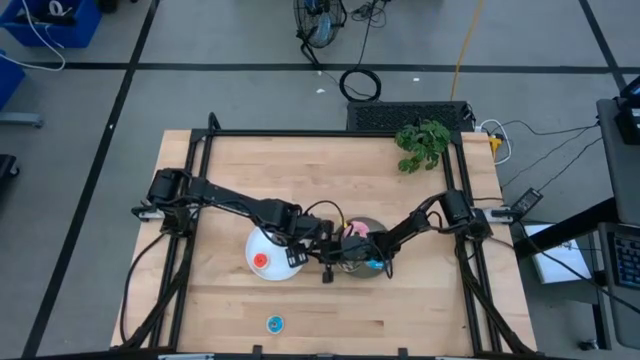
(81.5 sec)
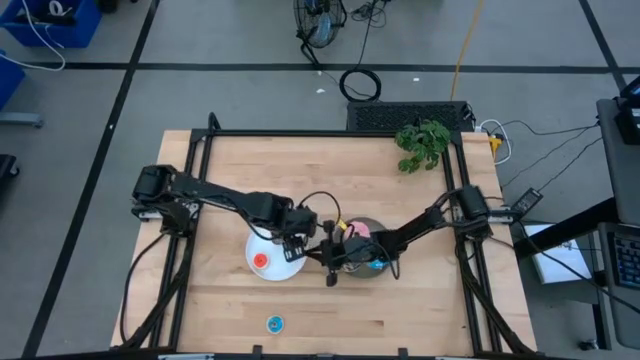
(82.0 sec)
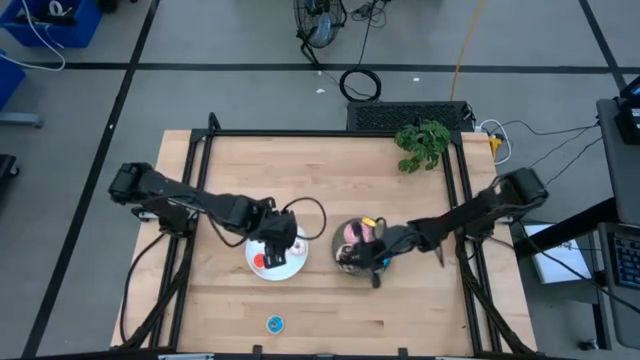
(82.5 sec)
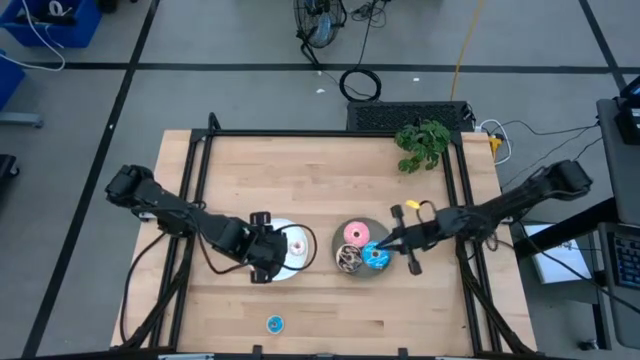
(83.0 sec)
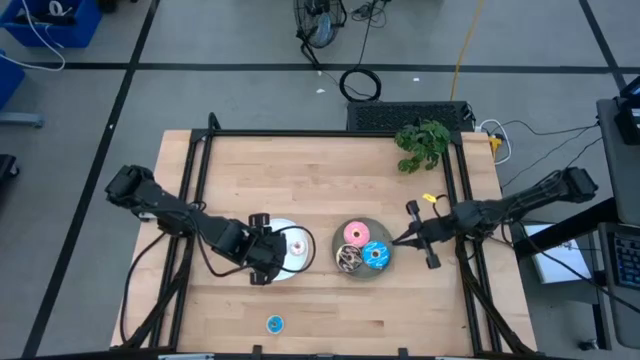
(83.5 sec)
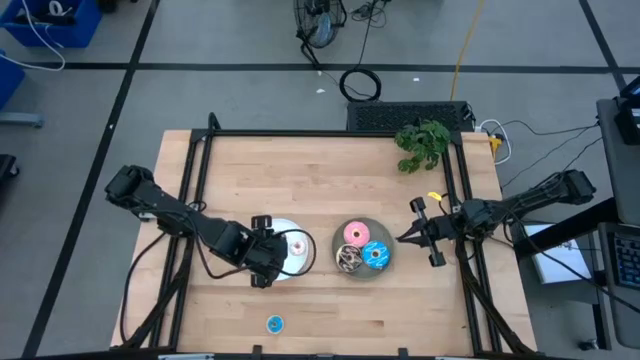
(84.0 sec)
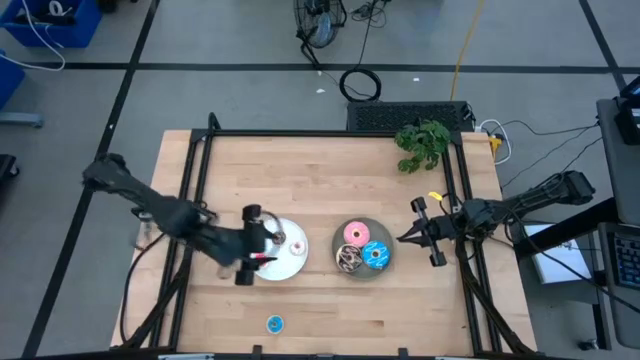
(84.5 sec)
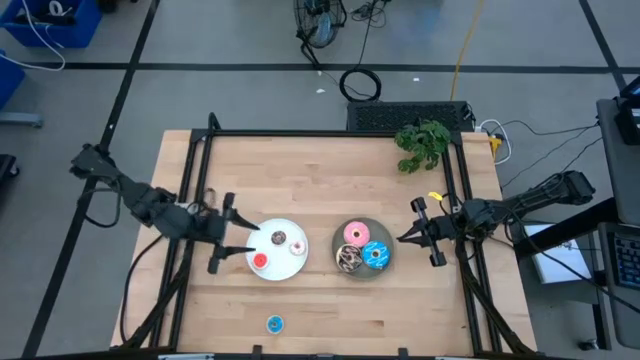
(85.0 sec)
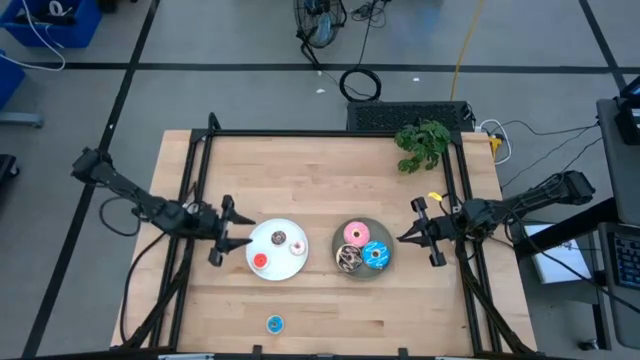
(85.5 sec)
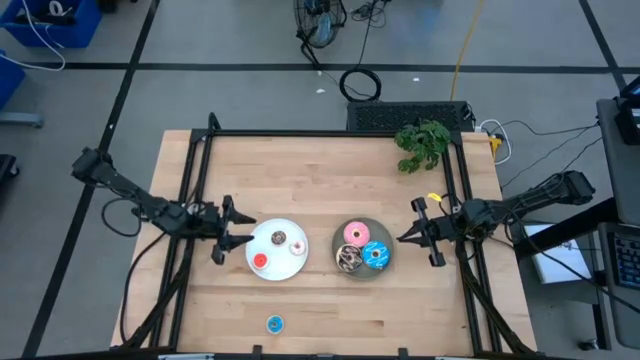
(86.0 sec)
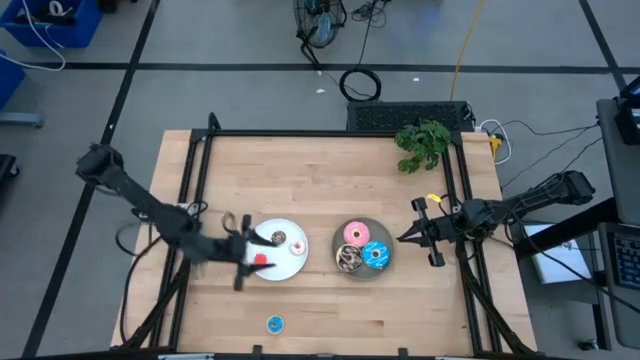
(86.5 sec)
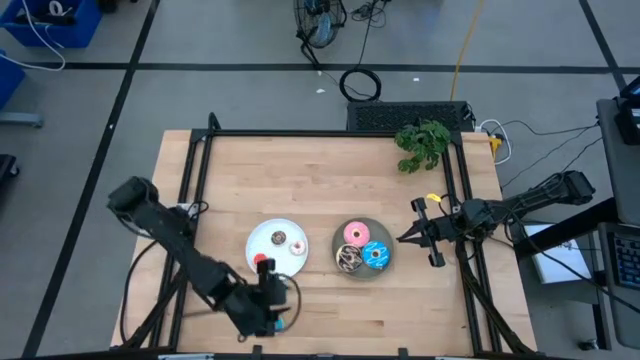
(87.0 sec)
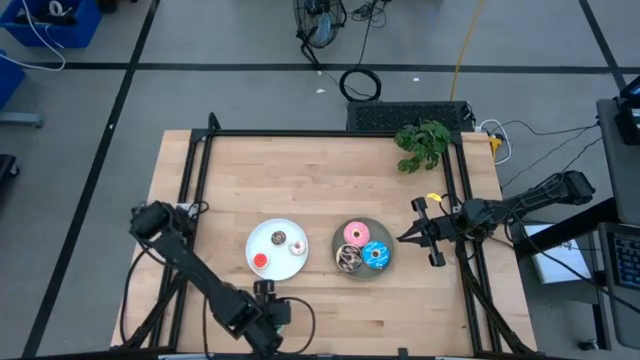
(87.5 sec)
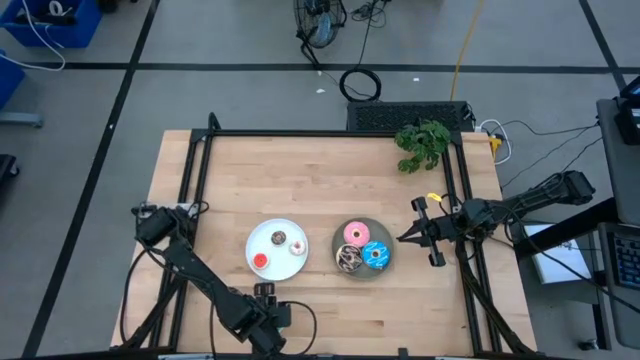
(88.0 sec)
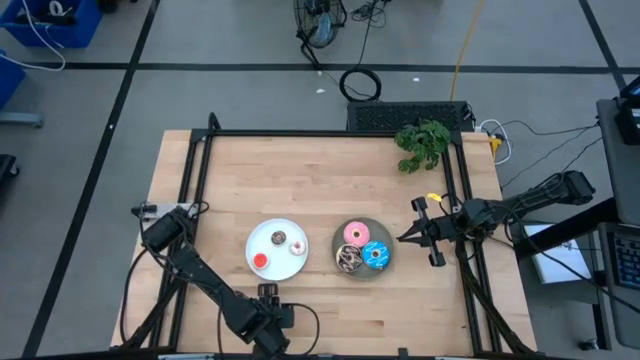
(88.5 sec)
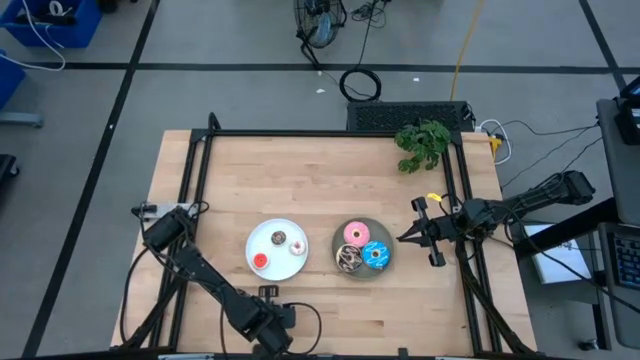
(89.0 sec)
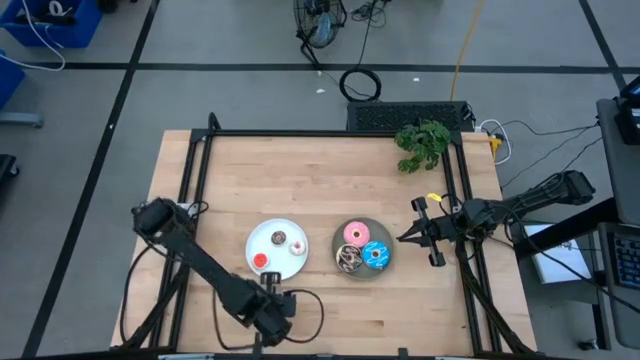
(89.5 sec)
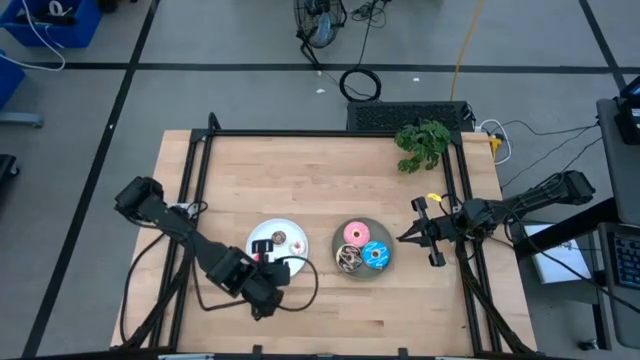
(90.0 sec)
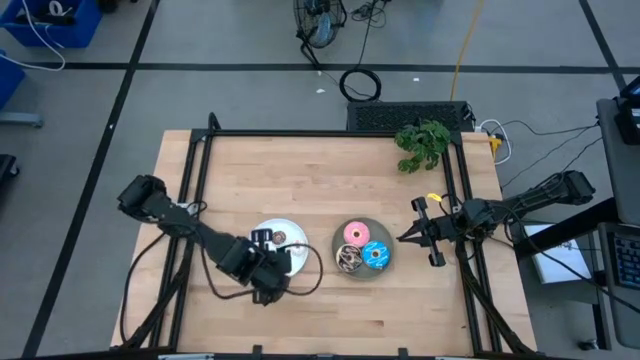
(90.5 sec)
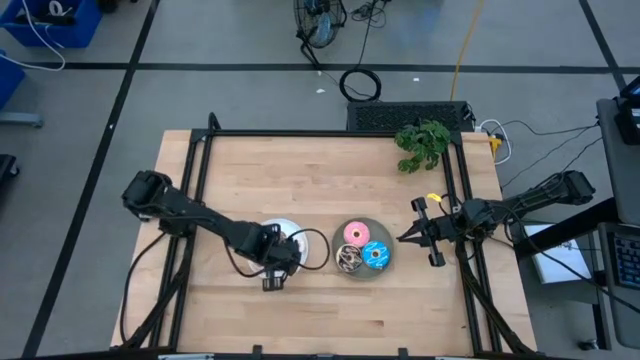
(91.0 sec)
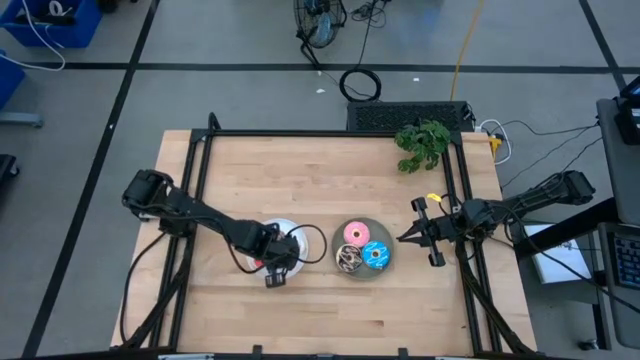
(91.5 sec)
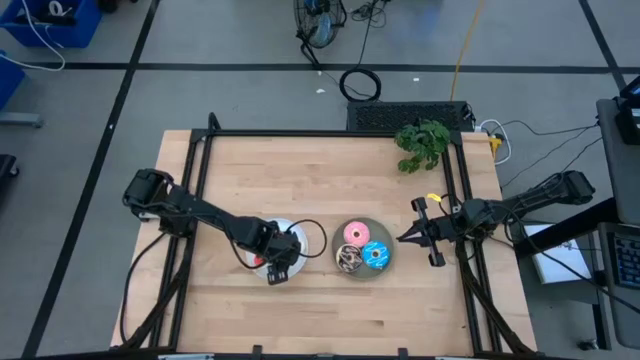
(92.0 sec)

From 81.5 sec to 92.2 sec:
Task: Pick & Place donuts
Put the small blue donut on the white plate

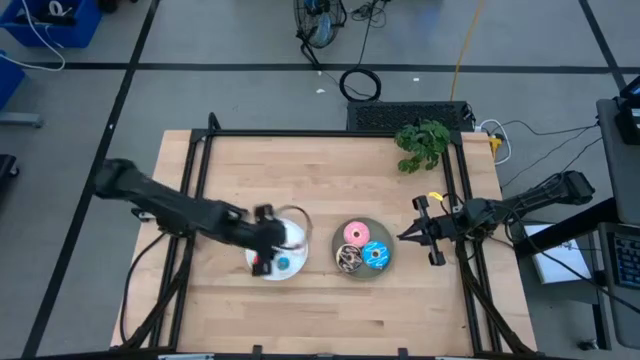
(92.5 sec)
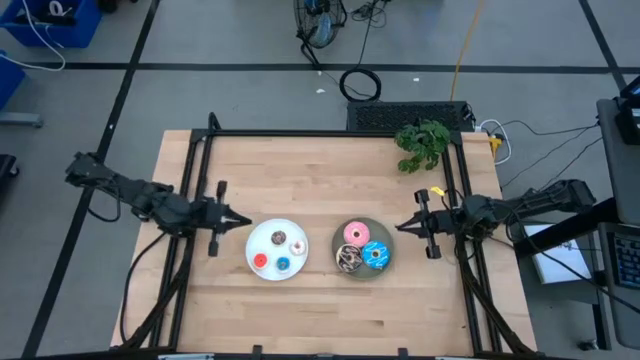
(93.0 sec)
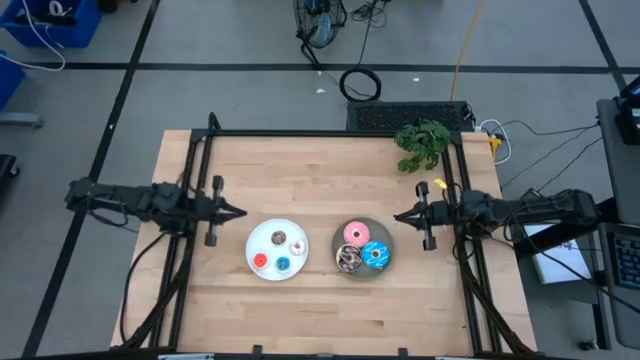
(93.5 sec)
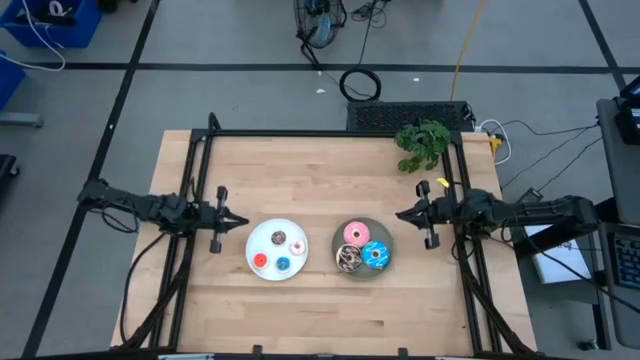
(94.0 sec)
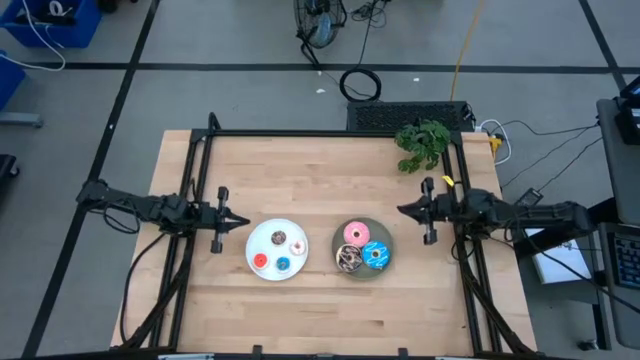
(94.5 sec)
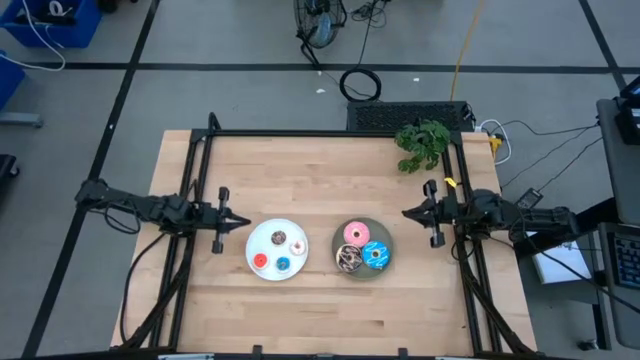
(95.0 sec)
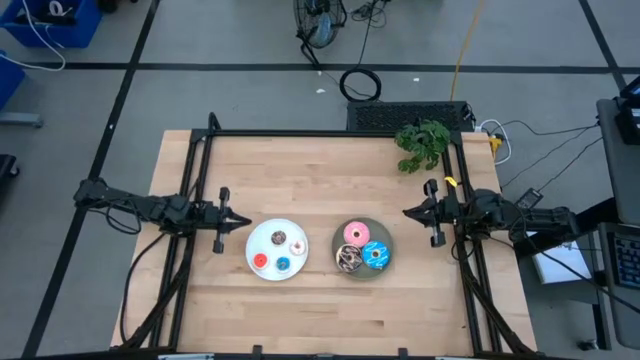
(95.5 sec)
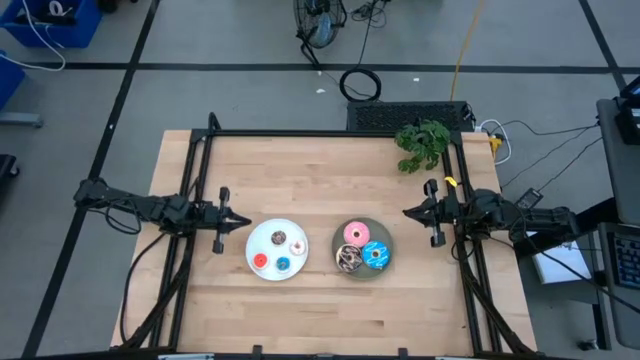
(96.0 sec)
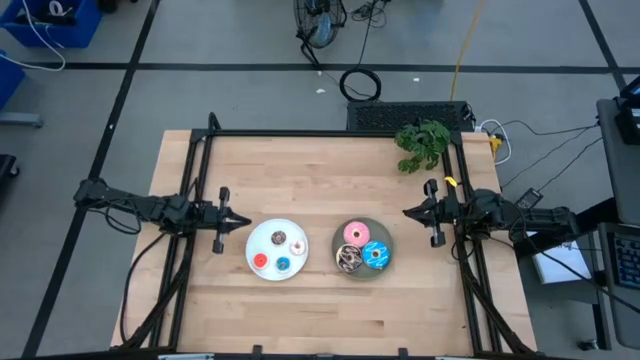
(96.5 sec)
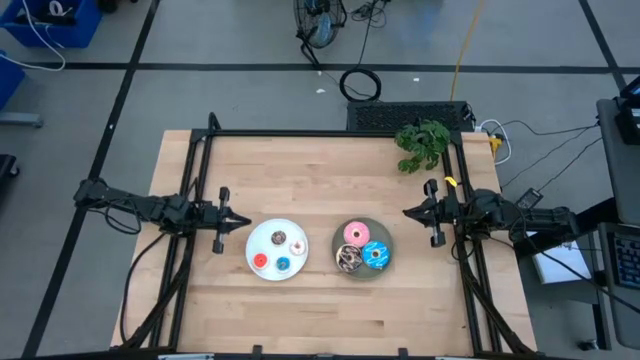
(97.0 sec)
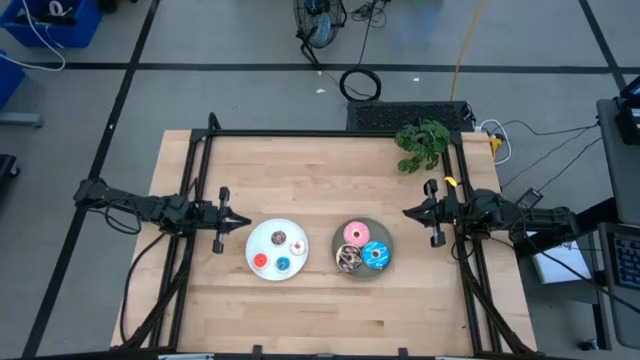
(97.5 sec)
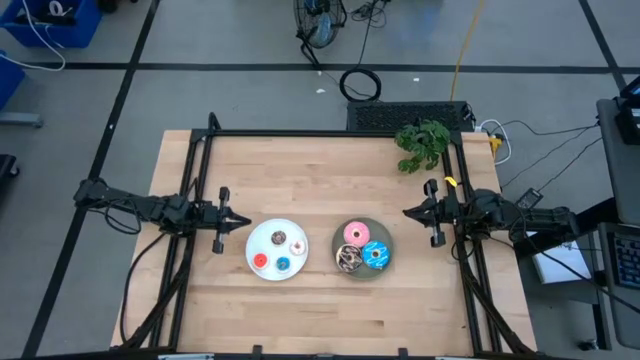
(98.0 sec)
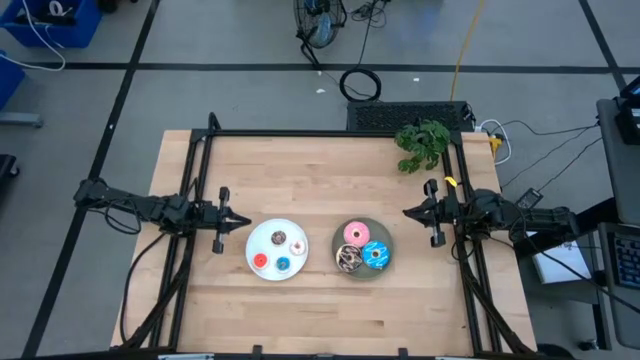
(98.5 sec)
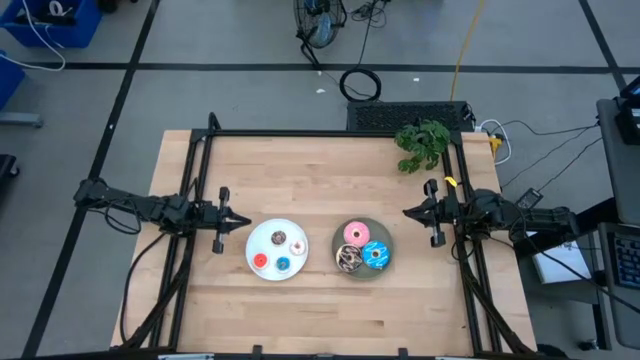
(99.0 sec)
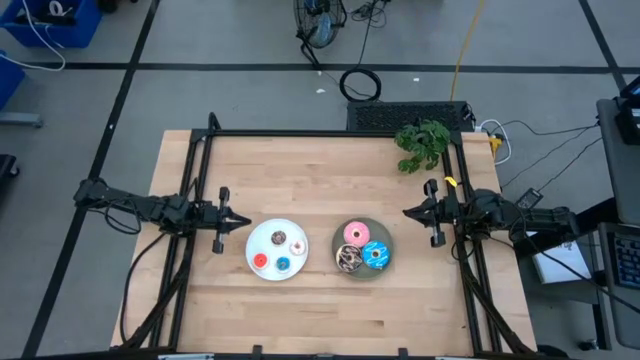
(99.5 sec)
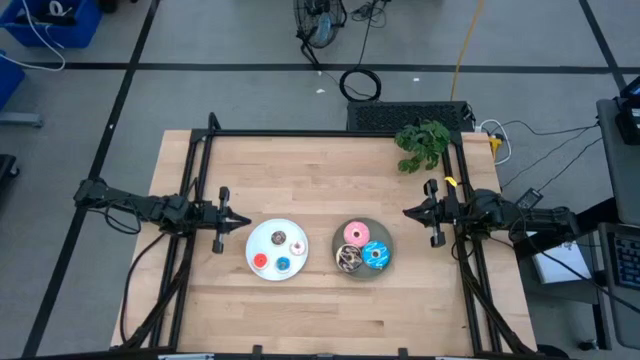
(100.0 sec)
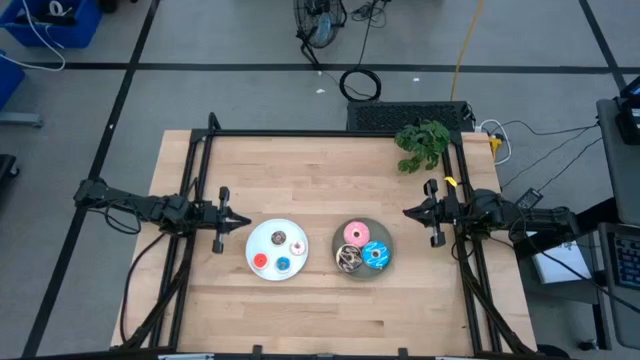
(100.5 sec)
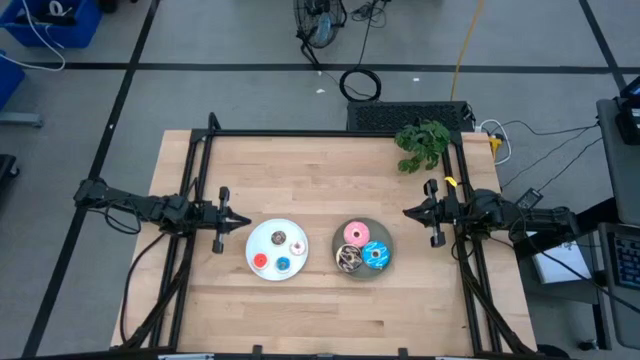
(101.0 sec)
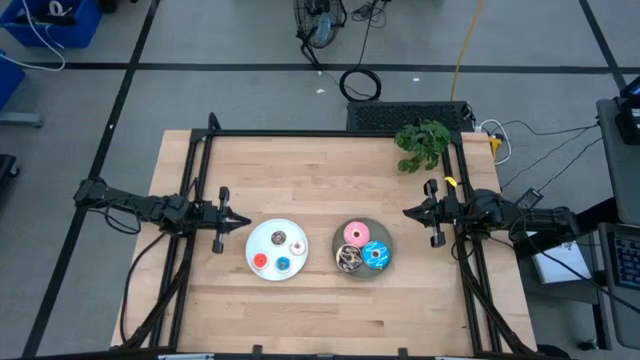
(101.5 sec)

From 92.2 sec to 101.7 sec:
Return to home position
